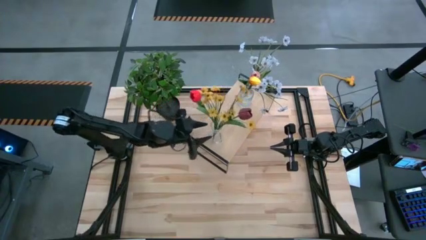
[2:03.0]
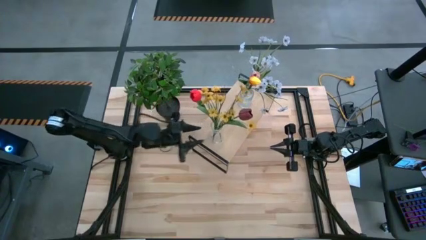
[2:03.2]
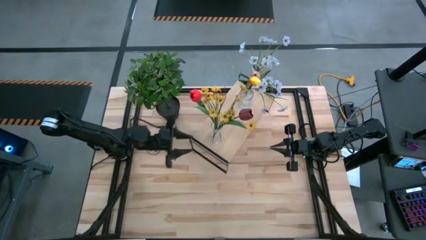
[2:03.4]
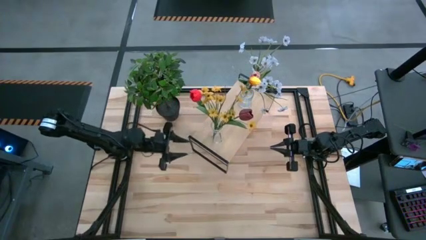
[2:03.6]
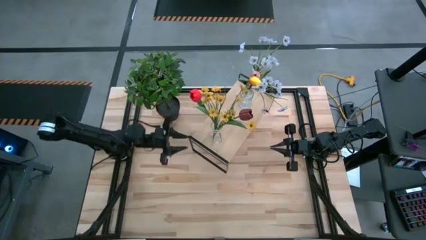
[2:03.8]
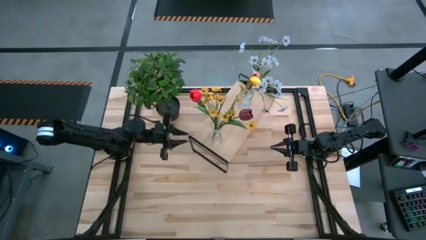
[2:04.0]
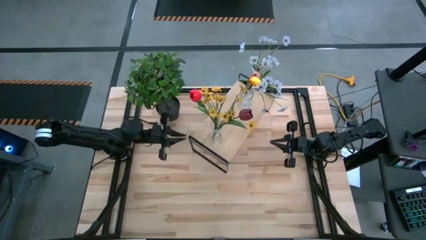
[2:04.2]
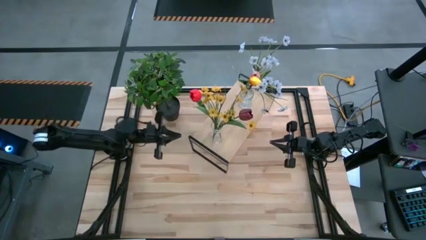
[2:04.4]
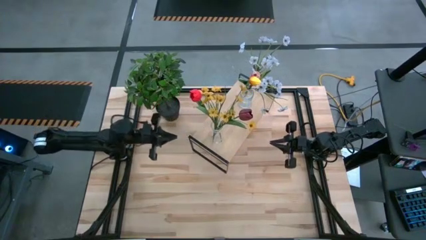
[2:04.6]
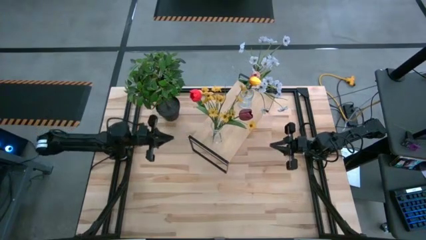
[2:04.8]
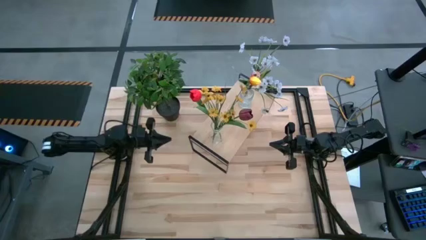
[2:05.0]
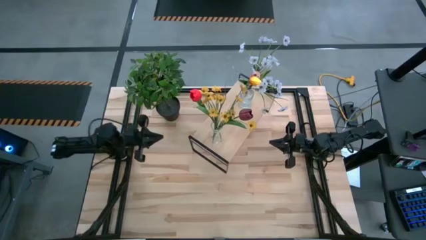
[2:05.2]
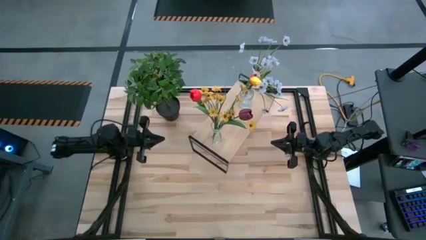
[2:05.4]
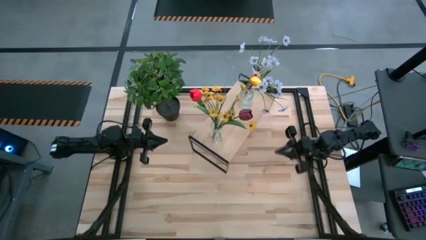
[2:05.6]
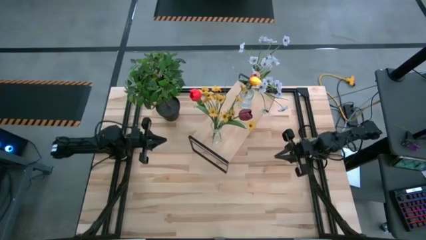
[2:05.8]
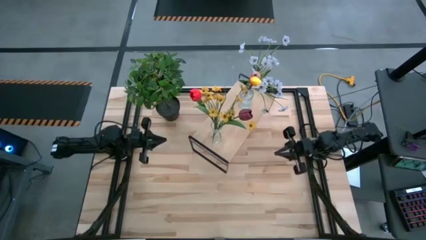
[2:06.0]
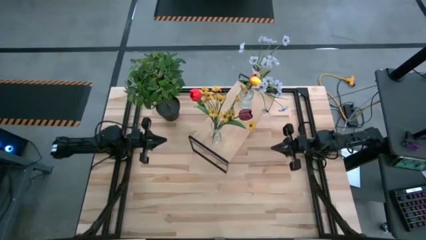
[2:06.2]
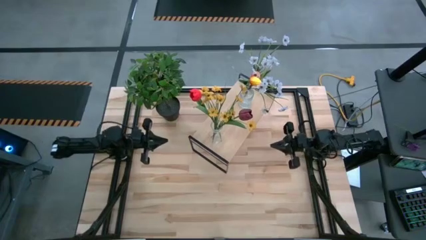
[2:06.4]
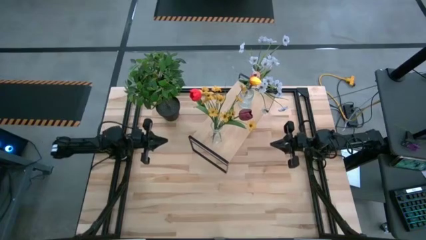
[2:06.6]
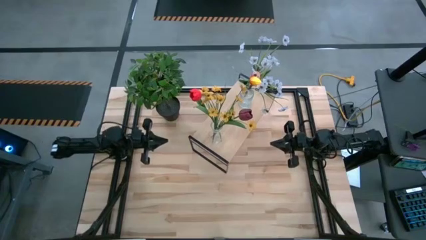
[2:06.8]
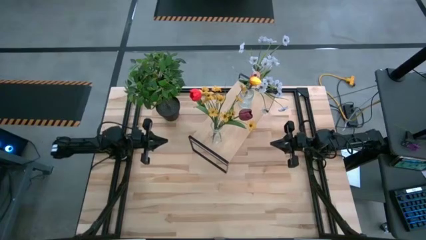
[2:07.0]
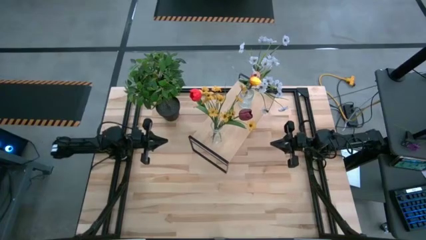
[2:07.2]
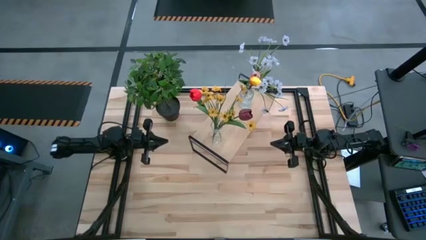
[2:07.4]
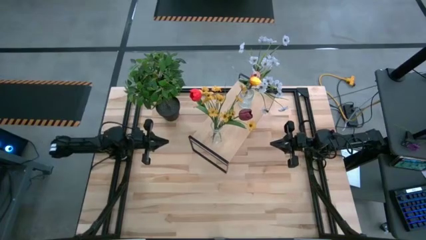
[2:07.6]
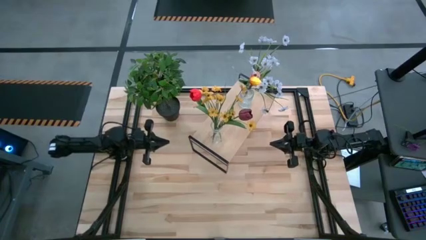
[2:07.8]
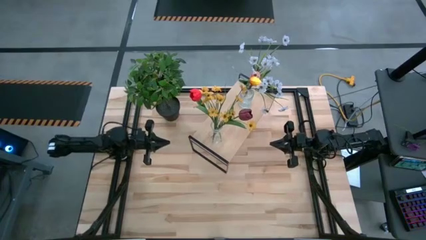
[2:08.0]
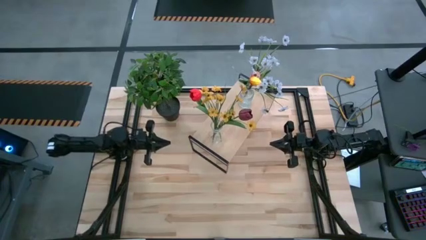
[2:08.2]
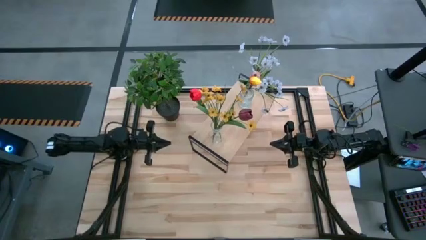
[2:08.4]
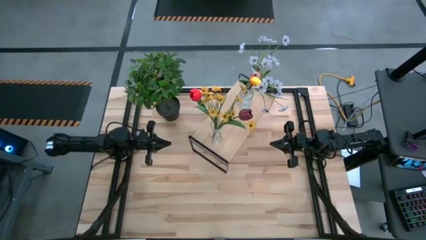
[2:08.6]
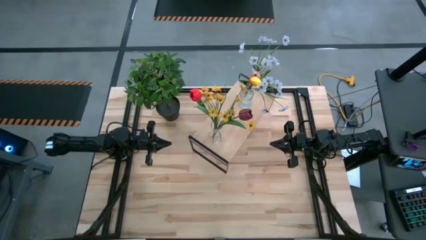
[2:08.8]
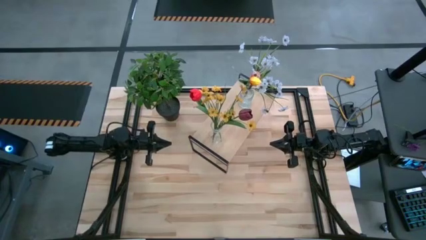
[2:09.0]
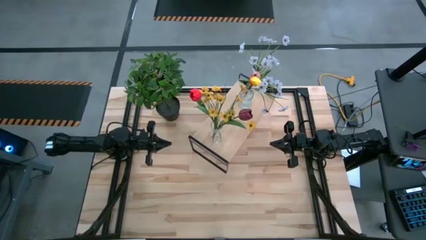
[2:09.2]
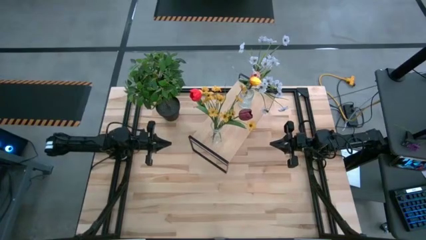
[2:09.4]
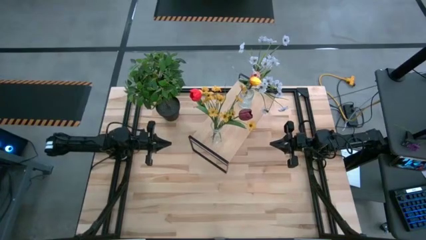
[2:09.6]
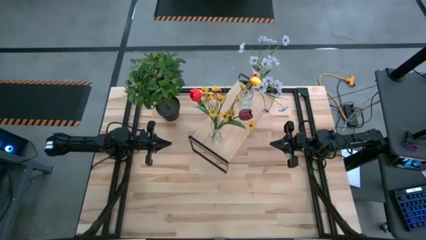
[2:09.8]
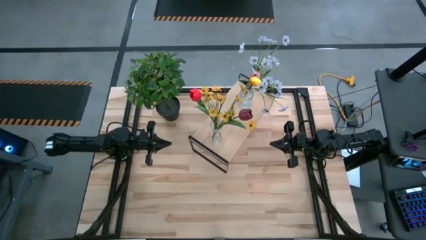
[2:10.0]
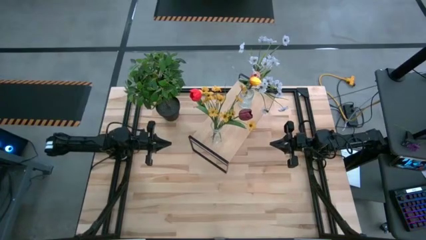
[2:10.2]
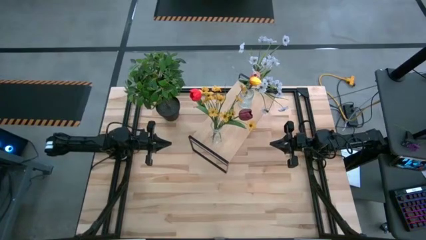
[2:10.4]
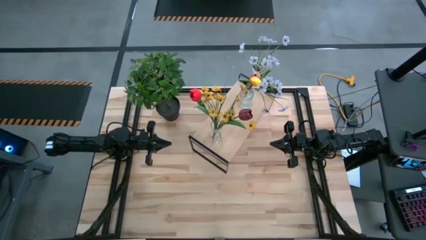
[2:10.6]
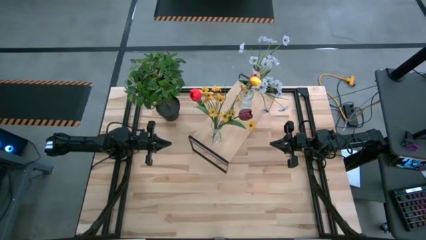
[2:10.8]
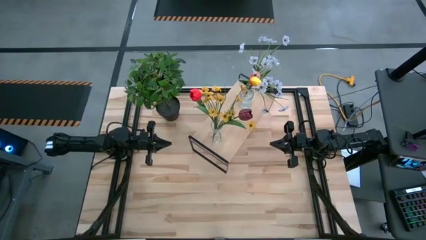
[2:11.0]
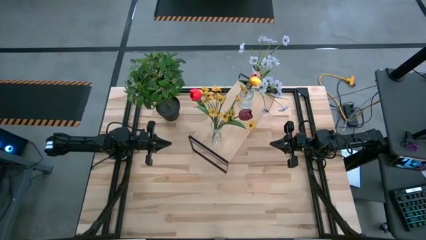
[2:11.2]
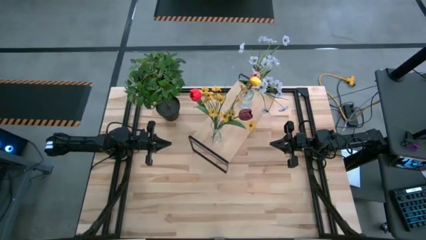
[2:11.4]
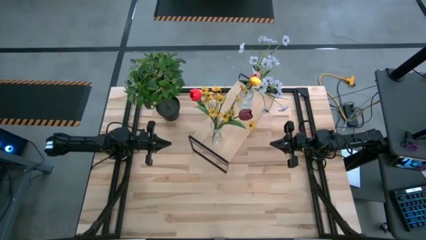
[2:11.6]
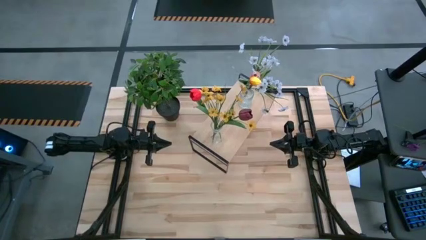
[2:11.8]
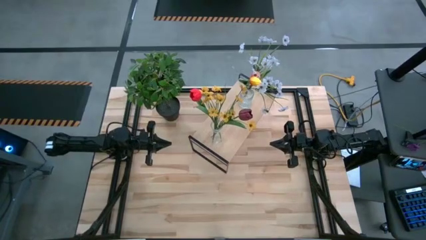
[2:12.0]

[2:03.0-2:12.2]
Task: Pick and place flowers into a vace then onto a shelf
Return to Home Position
